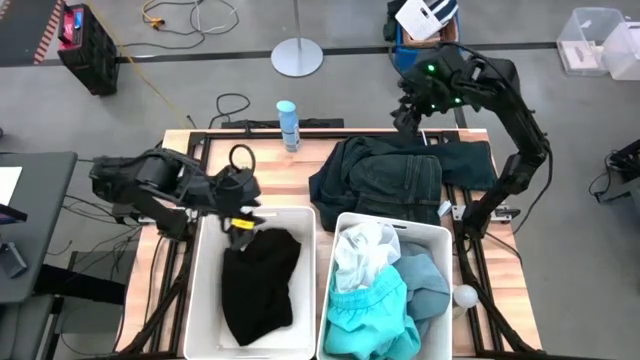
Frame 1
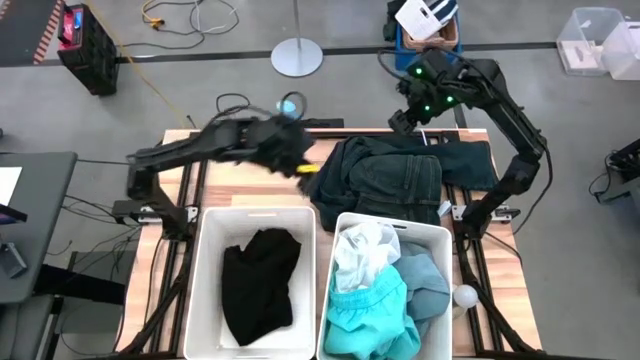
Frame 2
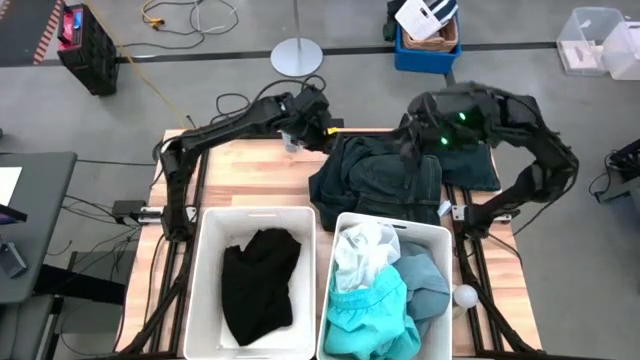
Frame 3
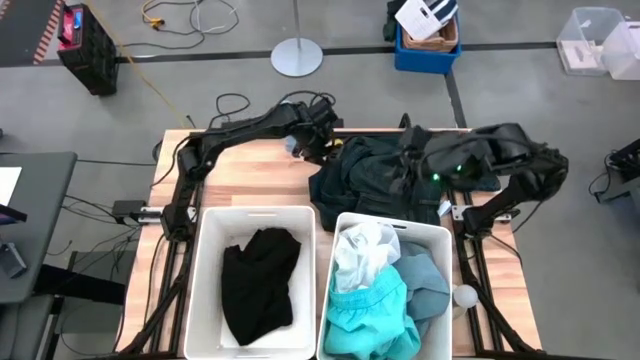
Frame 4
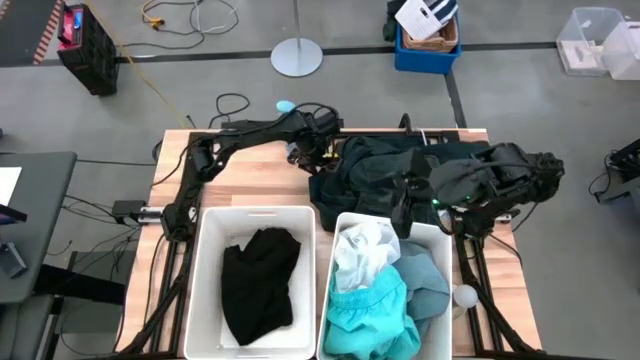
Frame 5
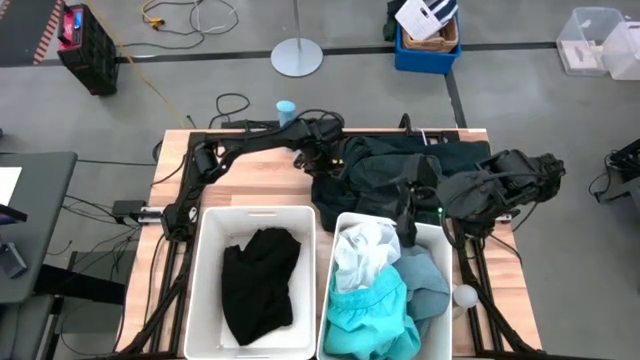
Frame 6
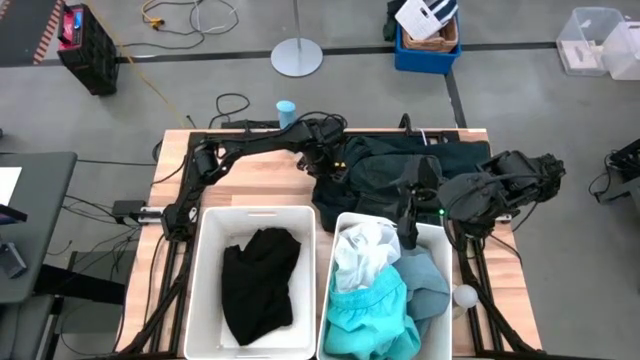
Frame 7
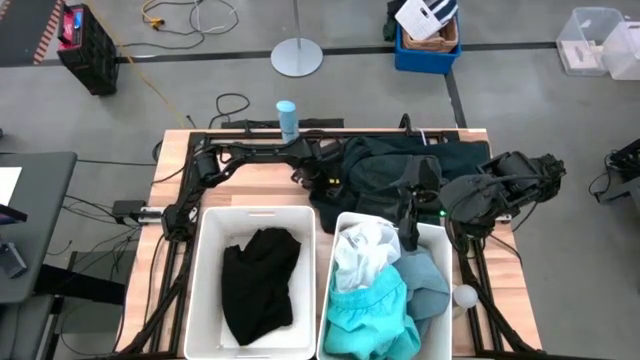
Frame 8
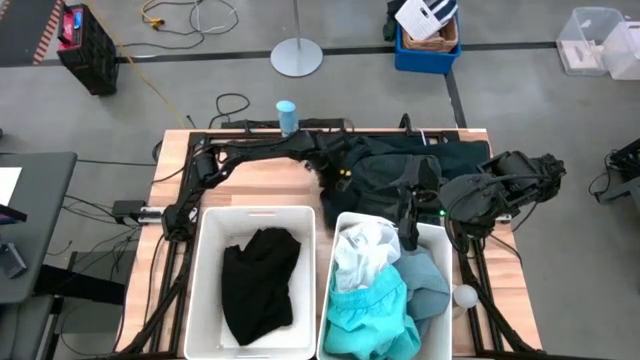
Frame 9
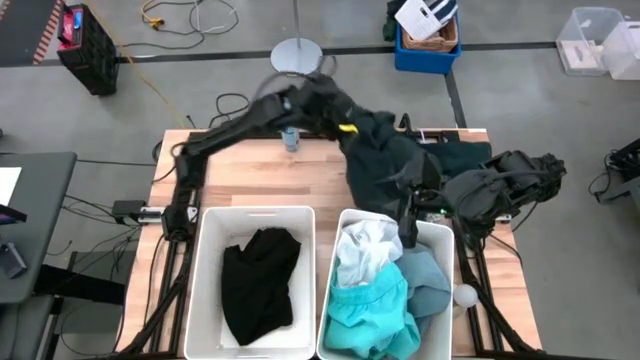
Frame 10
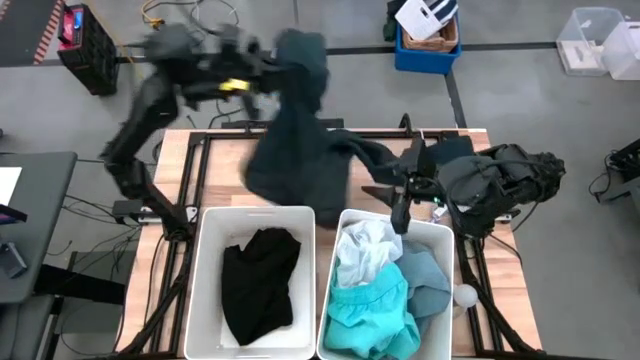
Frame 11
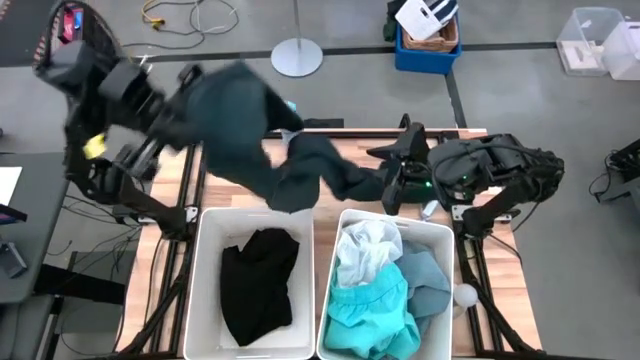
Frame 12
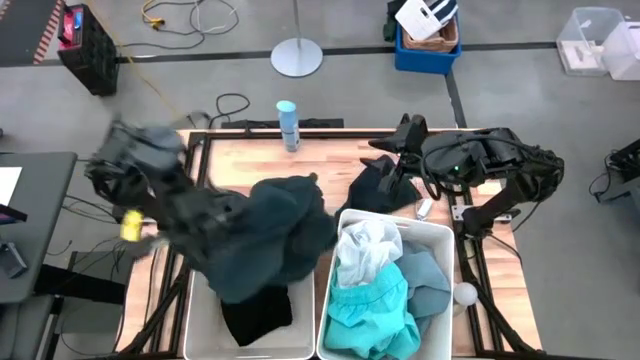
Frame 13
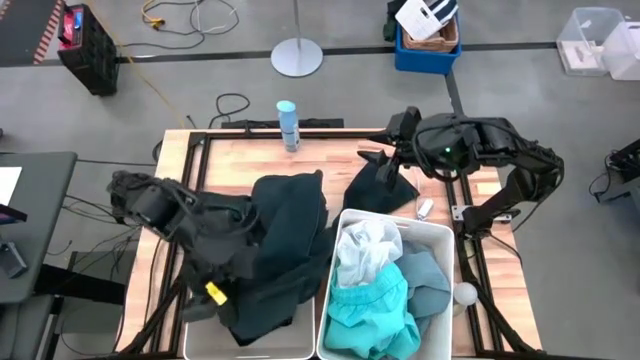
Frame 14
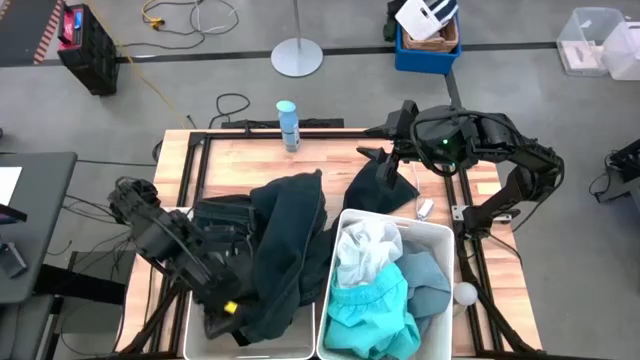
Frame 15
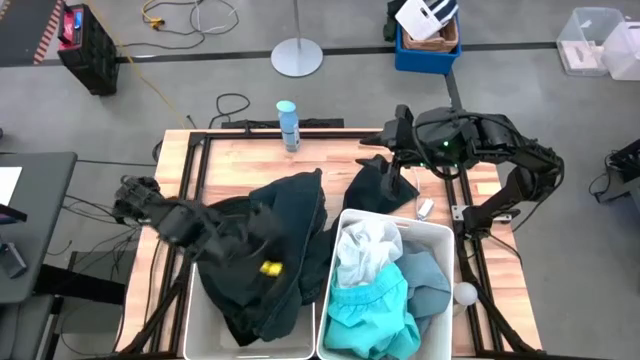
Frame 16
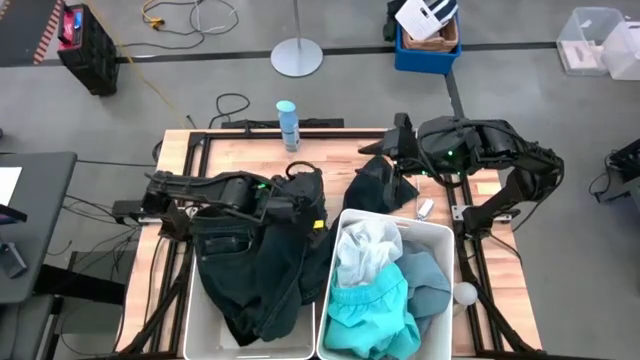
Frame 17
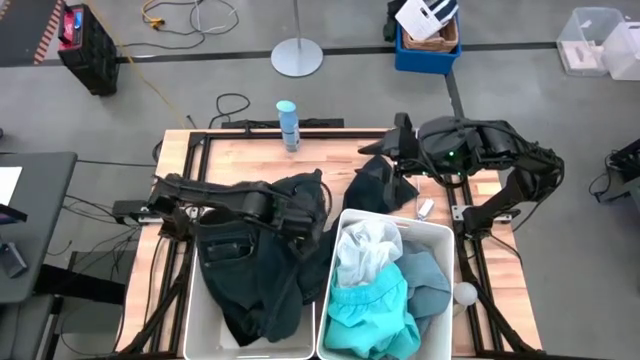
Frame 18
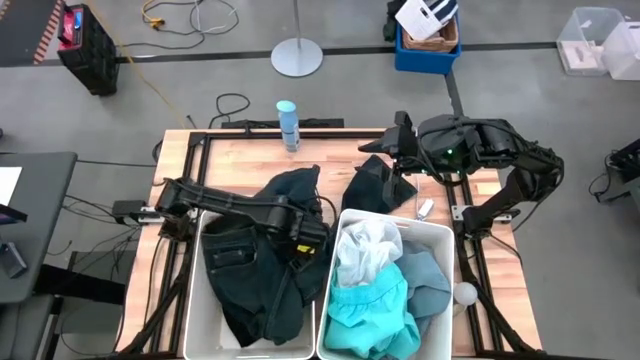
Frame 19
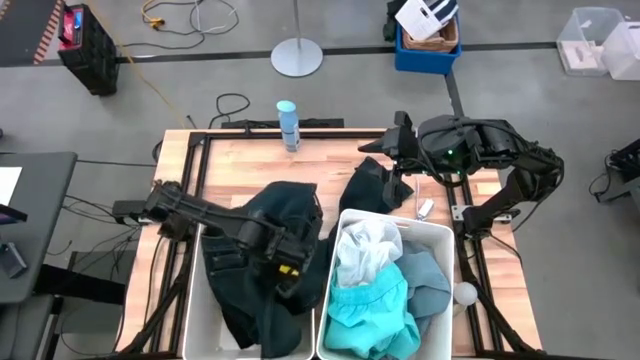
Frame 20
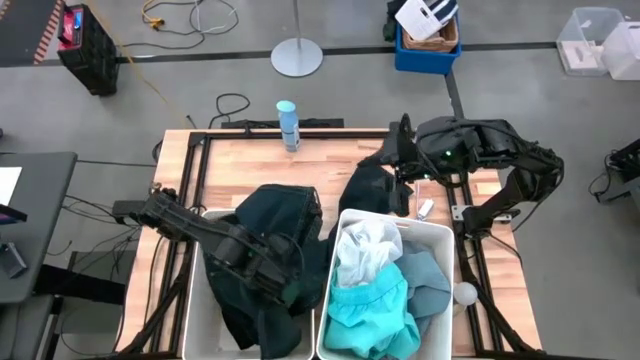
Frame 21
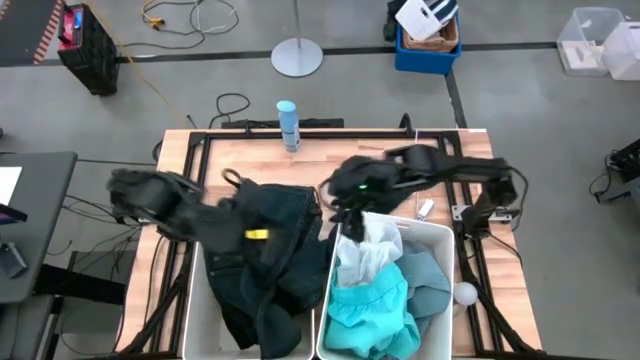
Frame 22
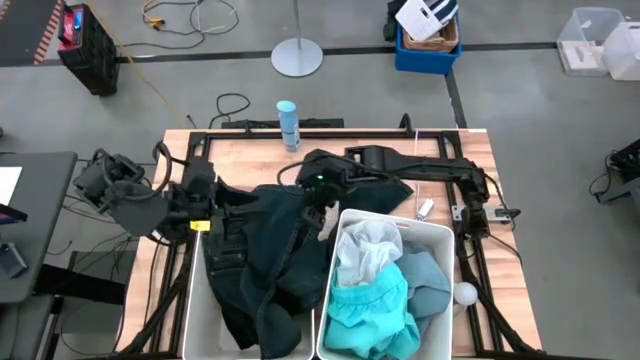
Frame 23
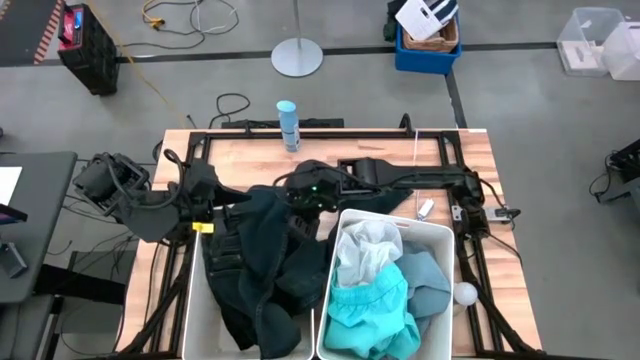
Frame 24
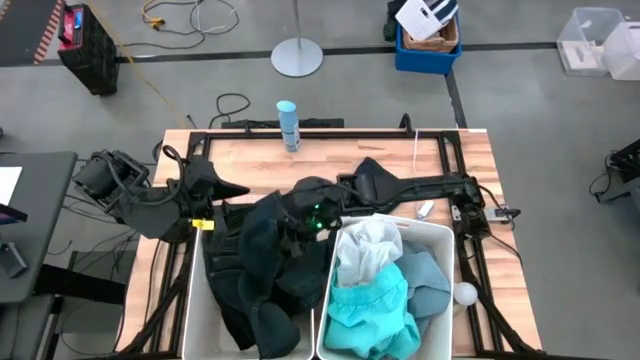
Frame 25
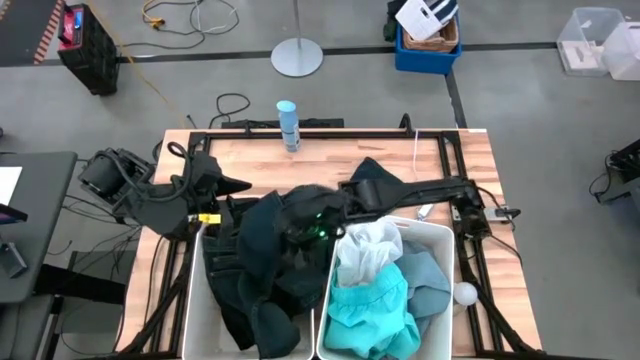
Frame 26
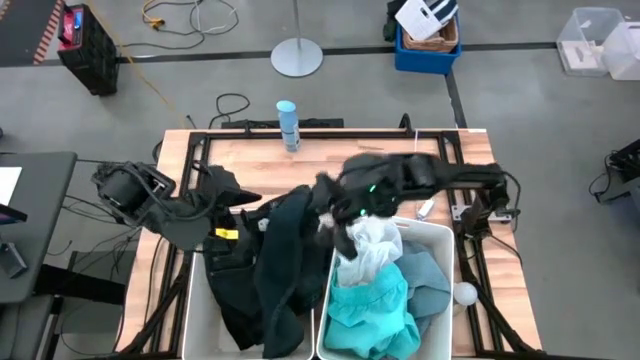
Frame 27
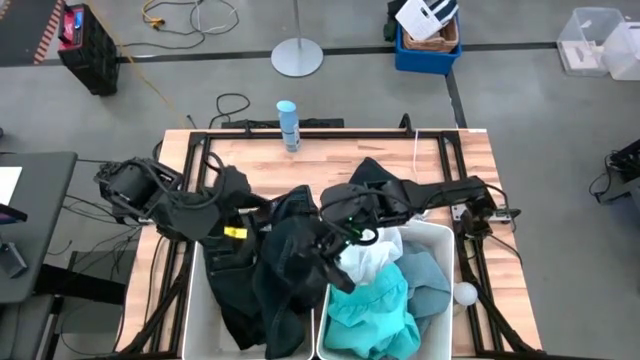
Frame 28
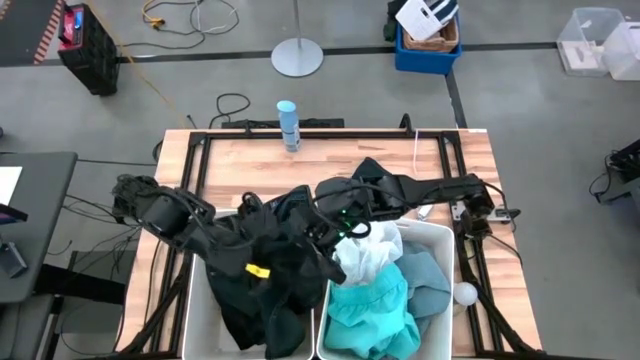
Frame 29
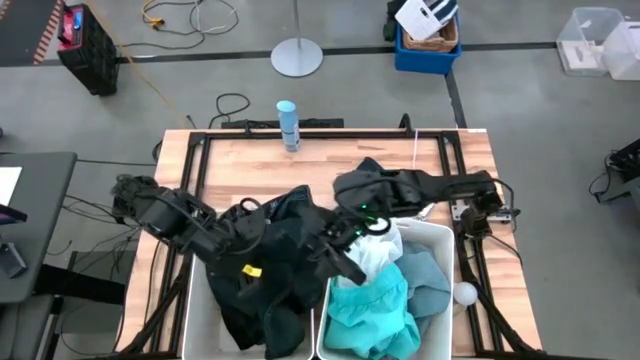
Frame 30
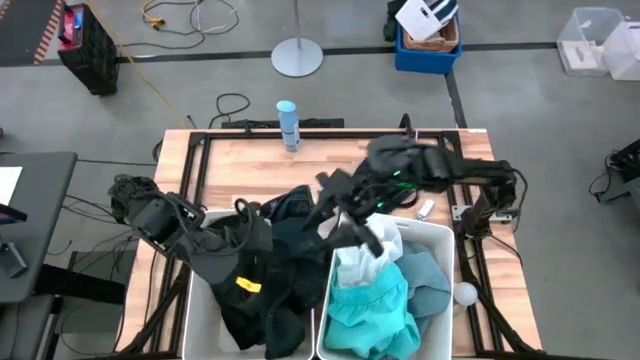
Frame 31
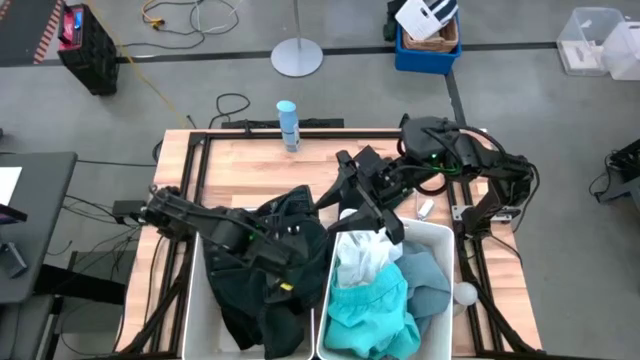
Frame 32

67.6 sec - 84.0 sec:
Task: Sort clothes
Put the dark blue pants into the left white bin
